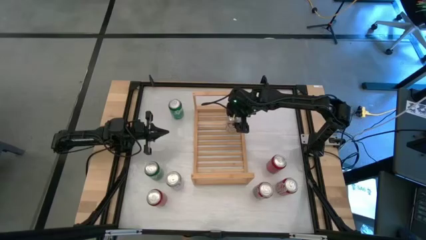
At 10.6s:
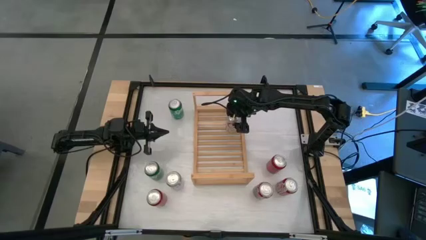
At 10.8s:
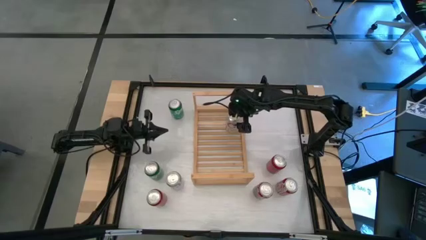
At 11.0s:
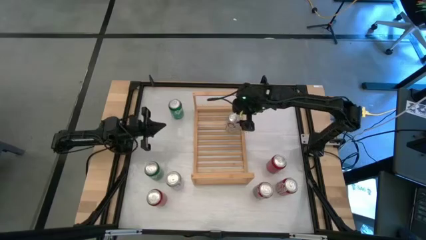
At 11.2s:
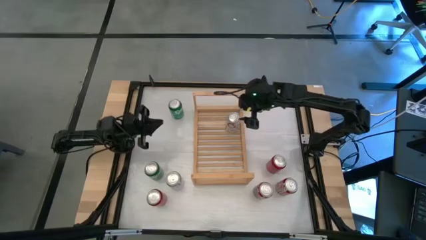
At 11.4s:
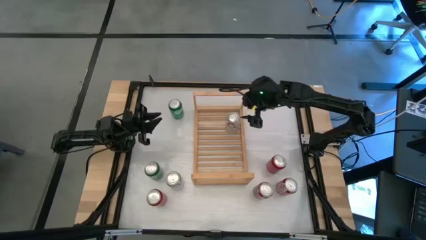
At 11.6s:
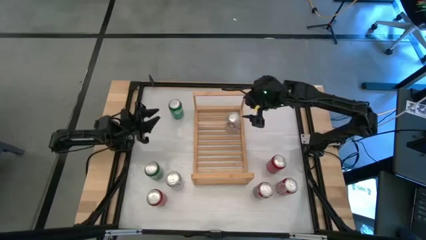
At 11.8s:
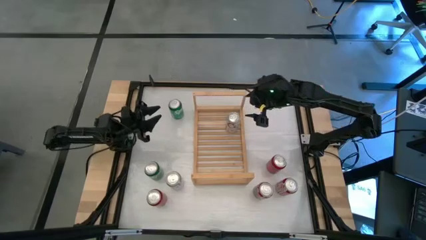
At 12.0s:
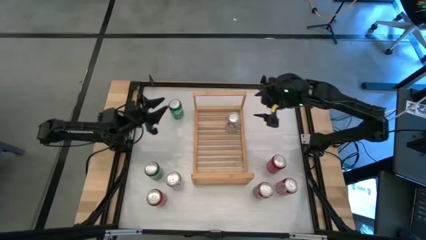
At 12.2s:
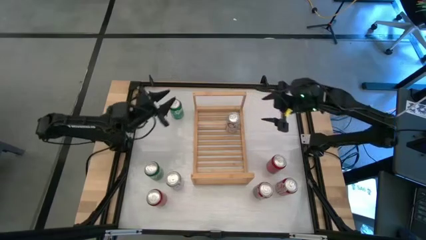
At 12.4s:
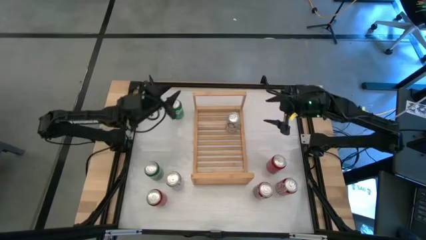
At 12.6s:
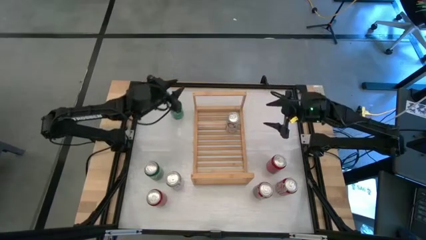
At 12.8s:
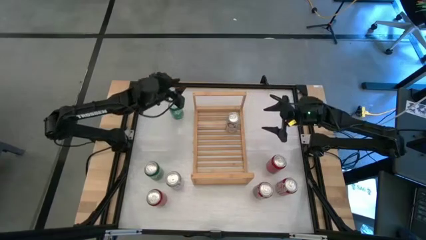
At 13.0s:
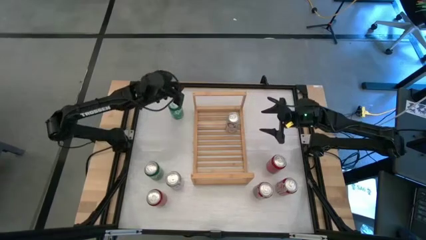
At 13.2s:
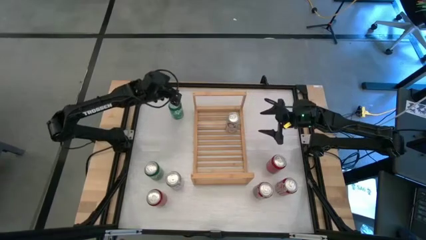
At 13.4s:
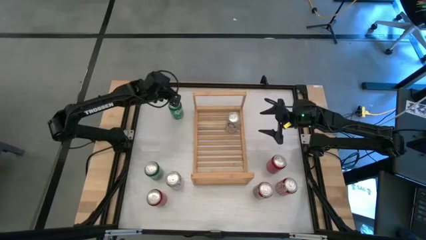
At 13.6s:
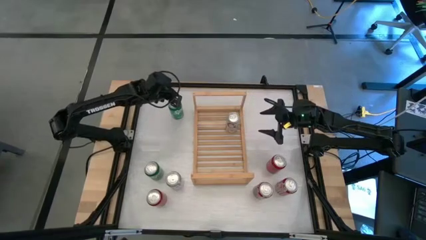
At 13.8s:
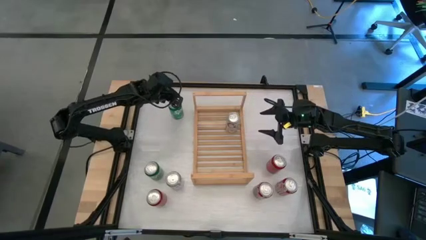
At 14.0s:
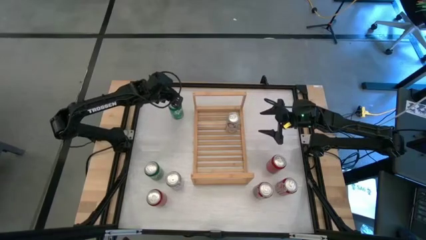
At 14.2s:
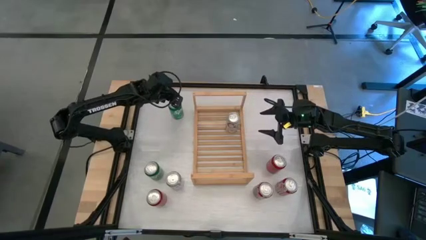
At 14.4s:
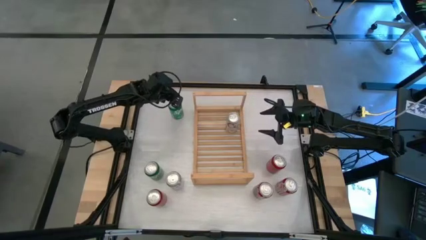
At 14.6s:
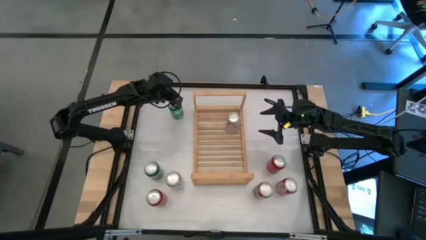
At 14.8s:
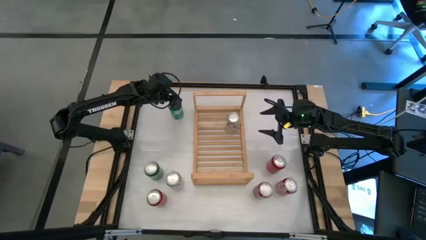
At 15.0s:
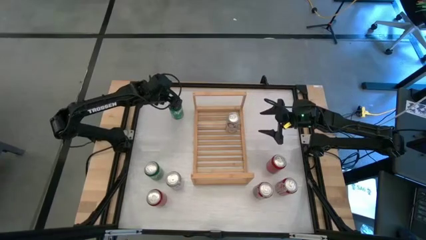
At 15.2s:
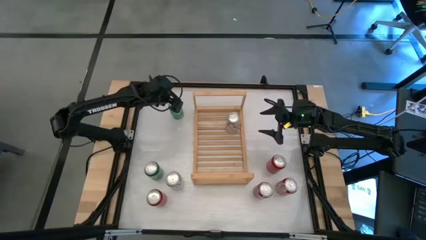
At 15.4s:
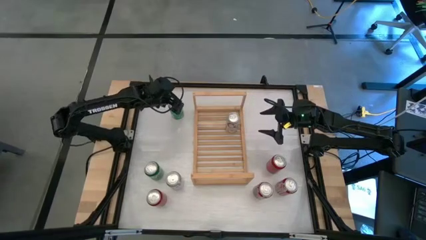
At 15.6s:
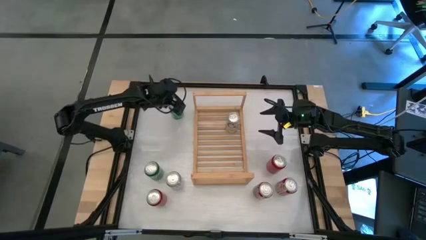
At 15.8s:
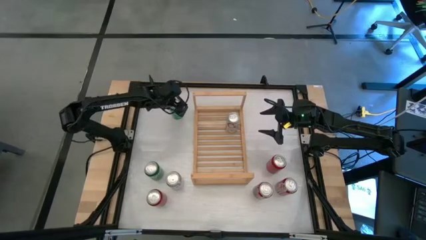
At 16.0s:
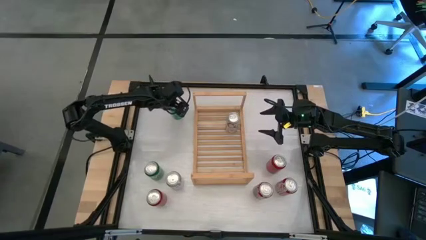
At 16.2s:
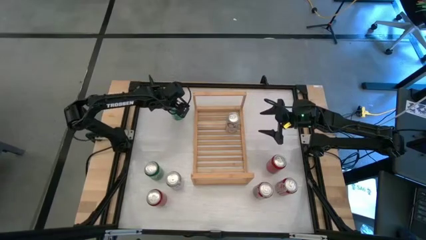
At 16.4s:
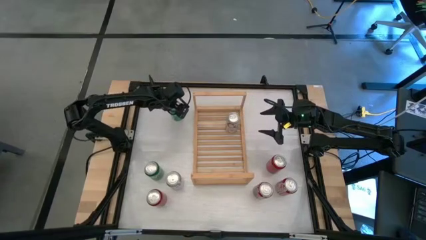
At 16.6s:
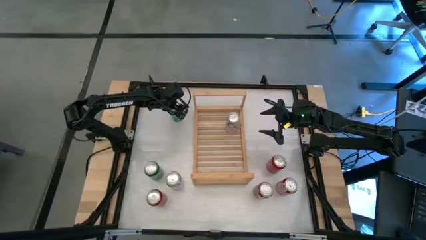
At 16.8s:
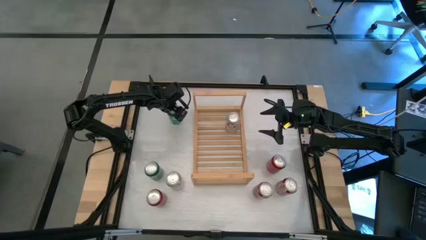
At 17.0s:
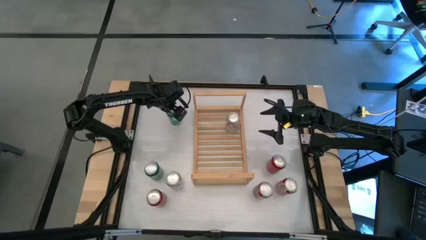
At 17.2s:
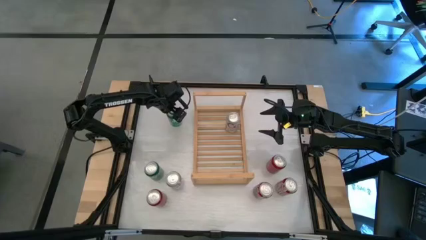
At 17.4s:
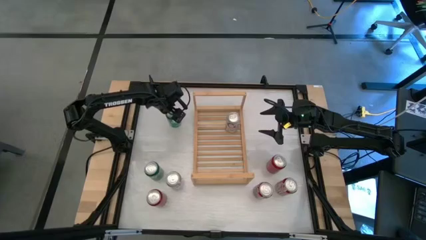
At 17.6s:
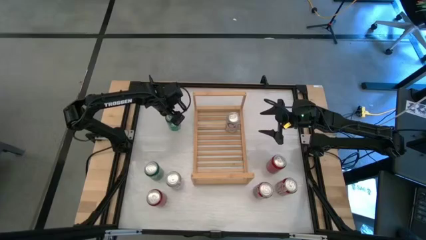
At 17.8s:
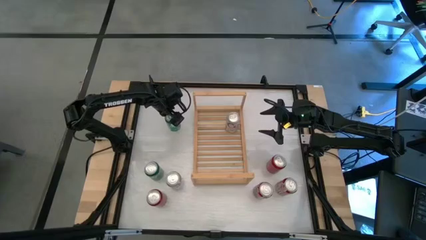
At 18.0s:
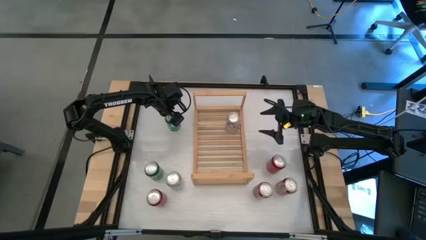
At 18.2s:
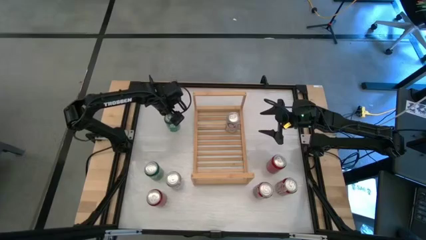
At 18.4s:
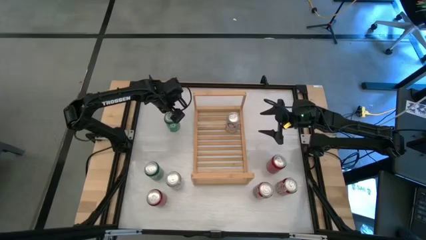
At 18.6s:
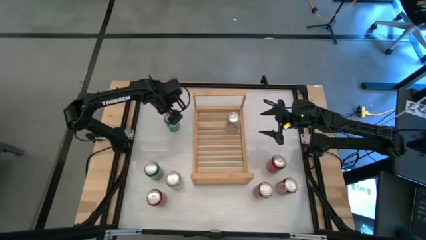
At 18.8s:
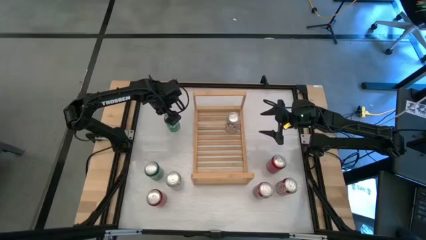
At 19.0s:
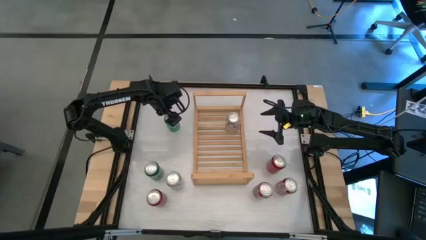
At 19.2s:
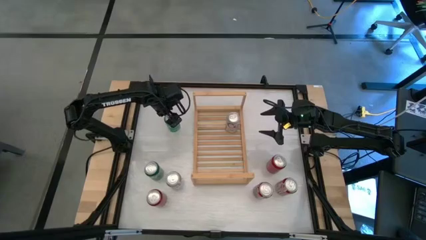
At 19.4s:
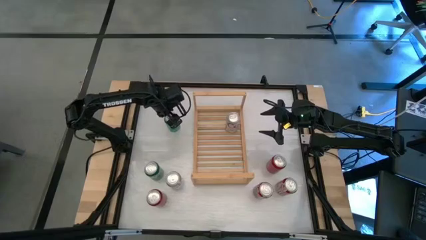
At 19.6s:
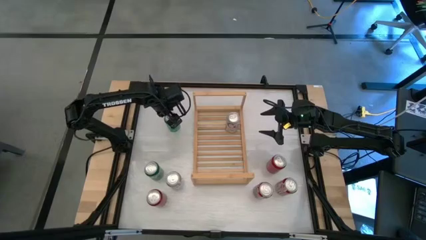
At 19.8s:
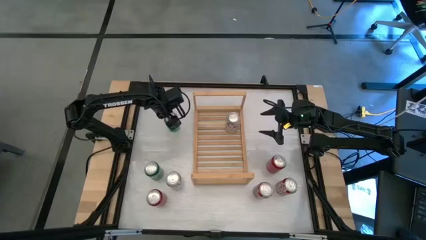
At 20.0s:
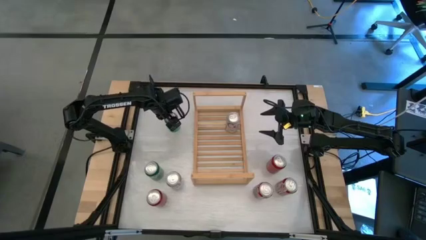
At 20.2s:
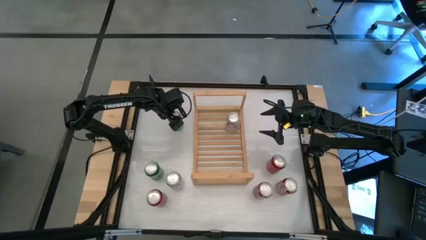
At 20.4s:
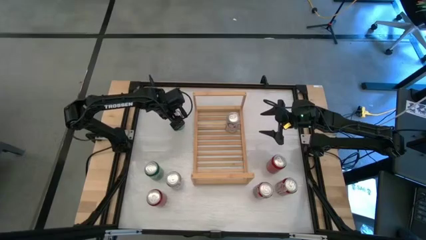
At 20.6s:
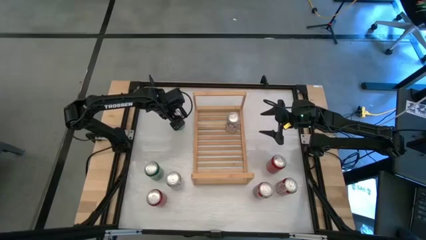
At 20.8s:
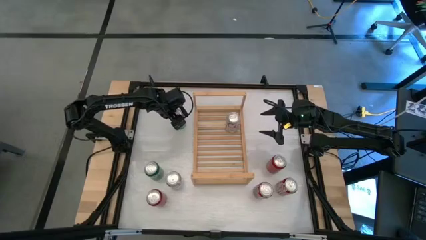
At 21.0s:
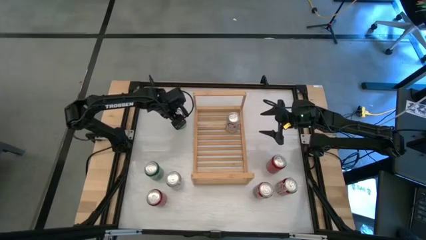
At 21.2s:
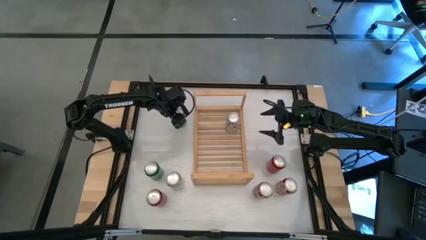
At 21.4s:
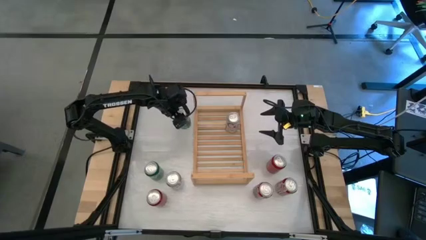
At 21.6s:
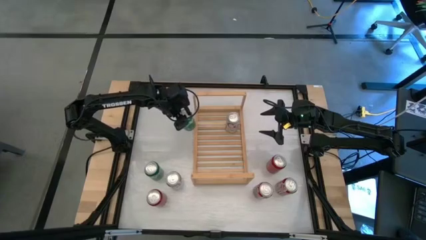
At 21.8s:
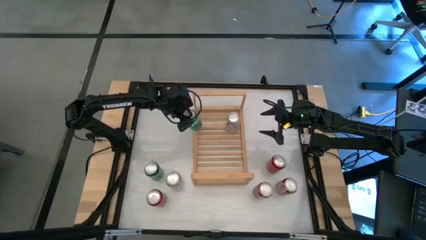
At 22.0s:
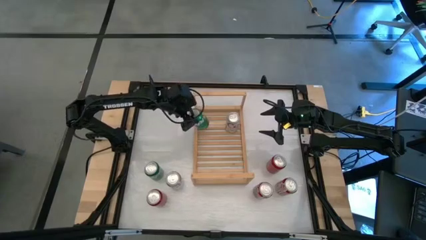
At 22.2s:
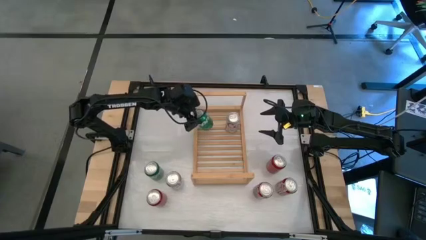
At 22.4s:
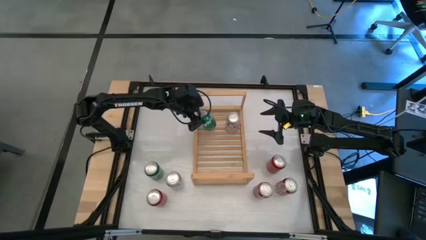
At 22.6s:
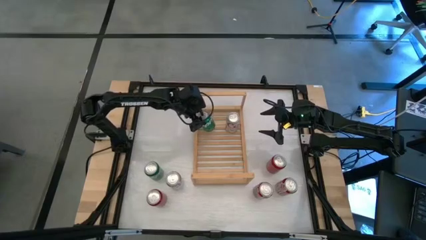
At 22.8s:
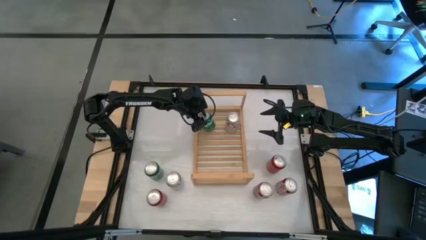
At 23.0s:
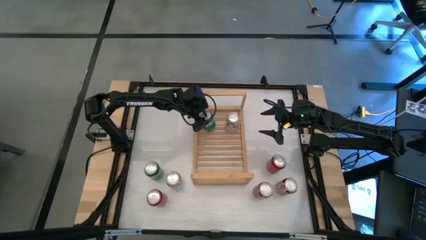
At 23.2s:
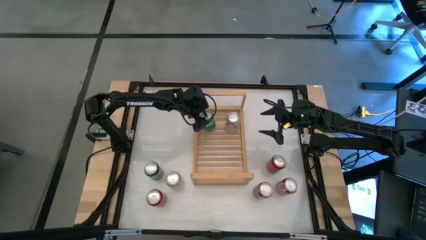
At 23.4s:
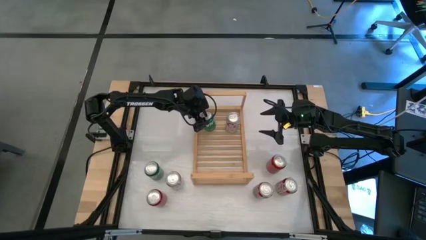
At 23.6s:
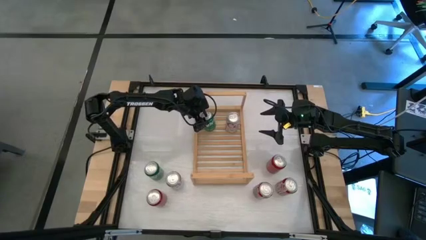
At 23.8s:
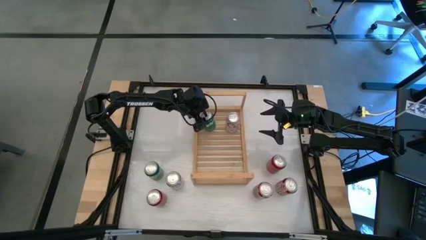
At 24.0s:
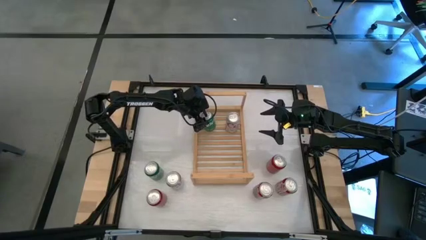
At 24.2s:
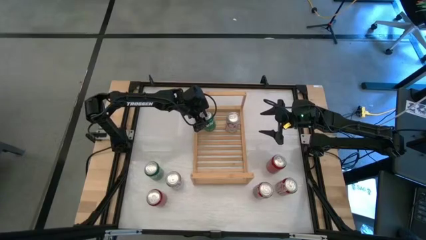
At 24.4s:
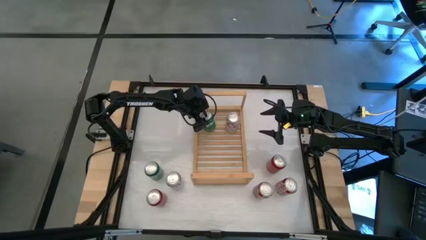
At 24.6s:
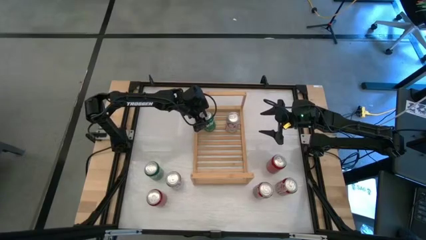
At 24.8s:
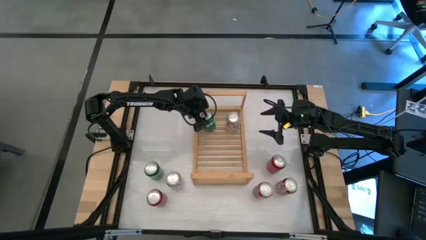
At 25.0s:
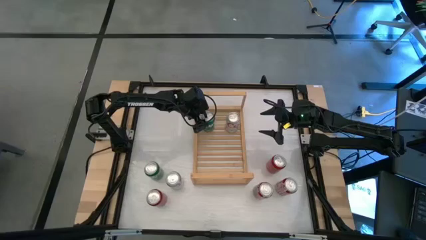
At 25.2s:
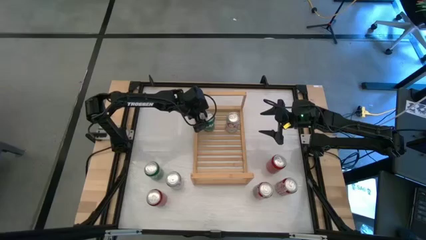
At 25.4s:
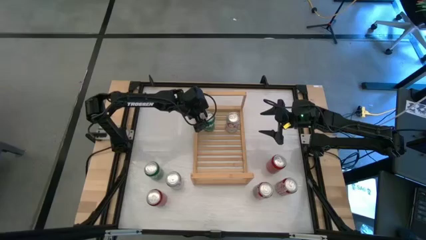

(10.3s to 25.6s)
Task: Place canned beverage on shelf
Put the top green soda can on the shelf
